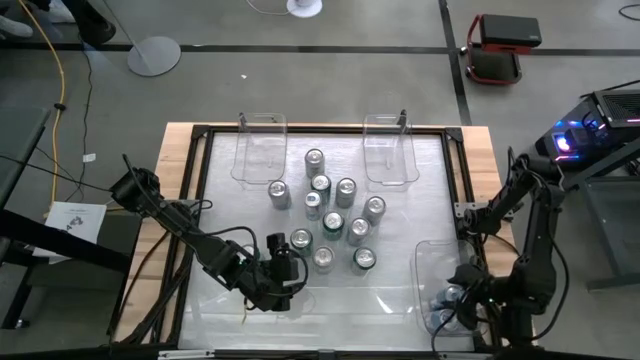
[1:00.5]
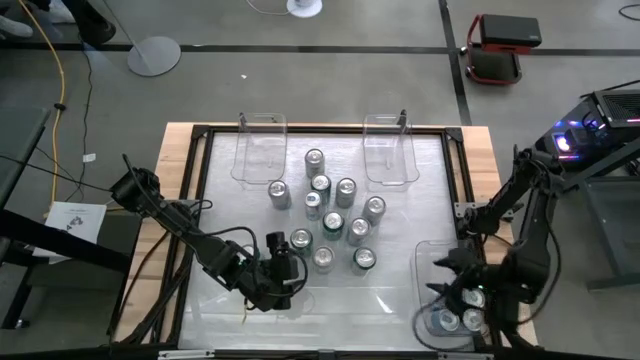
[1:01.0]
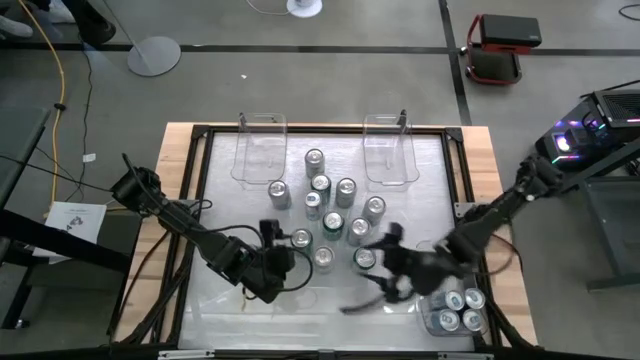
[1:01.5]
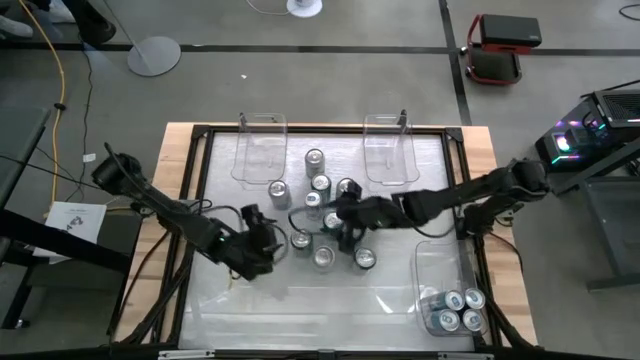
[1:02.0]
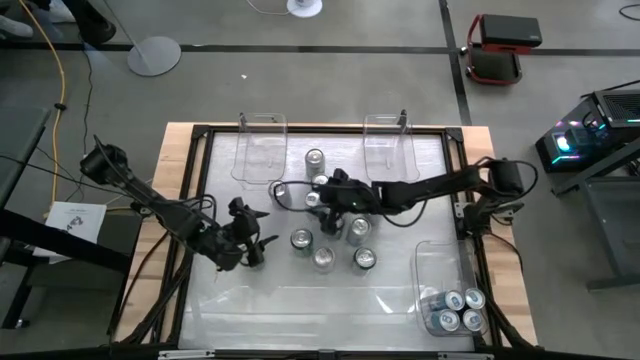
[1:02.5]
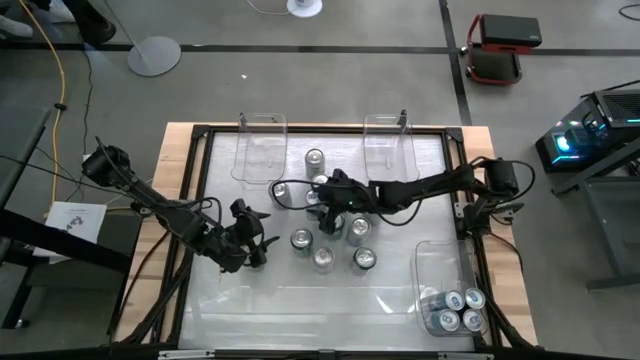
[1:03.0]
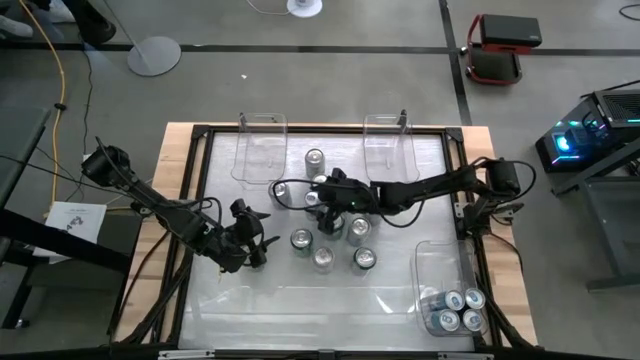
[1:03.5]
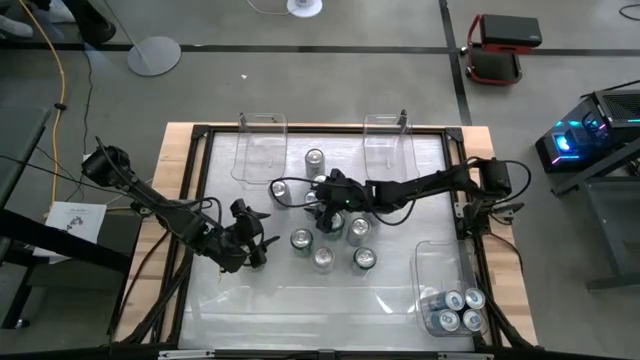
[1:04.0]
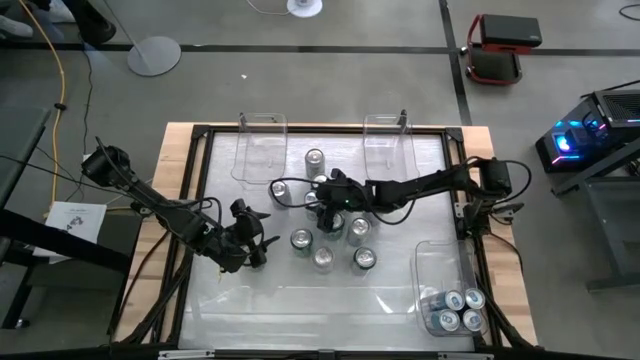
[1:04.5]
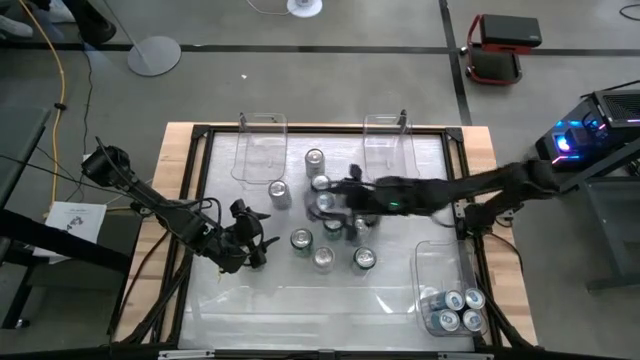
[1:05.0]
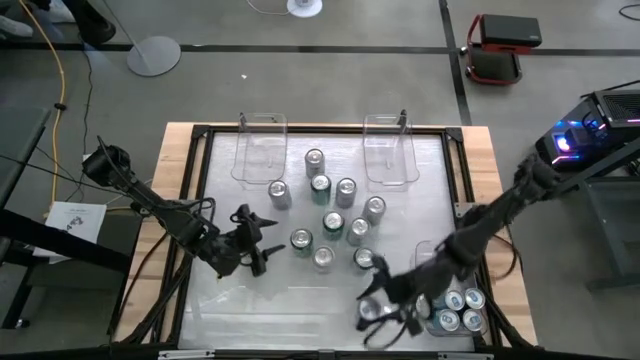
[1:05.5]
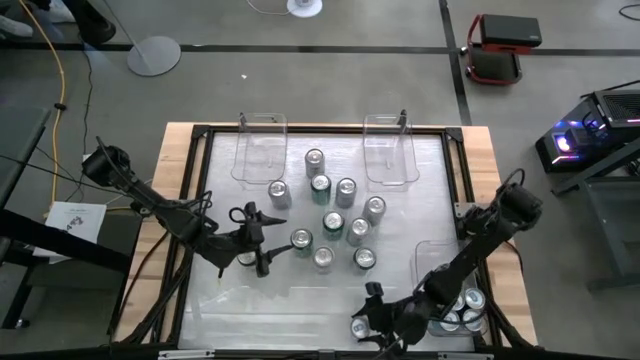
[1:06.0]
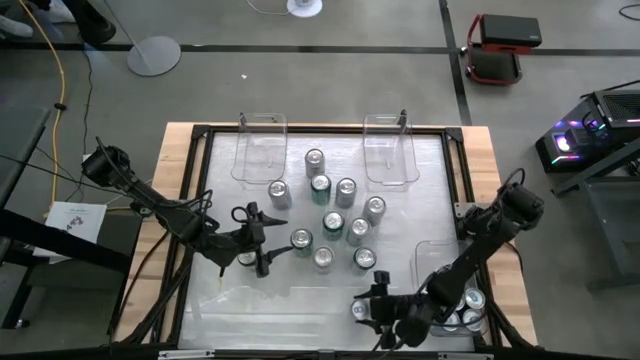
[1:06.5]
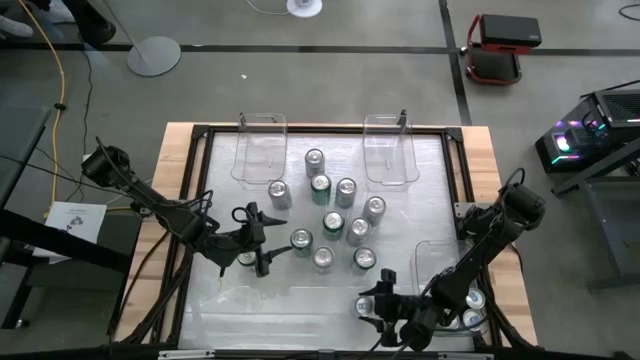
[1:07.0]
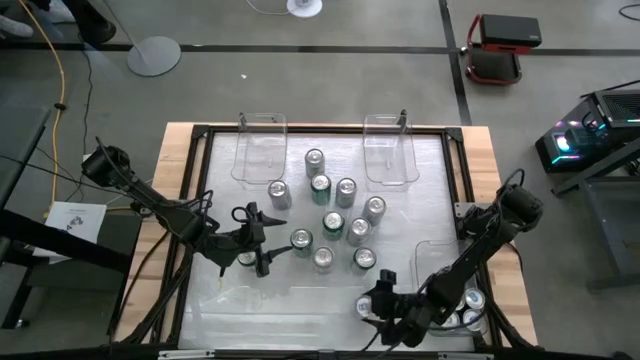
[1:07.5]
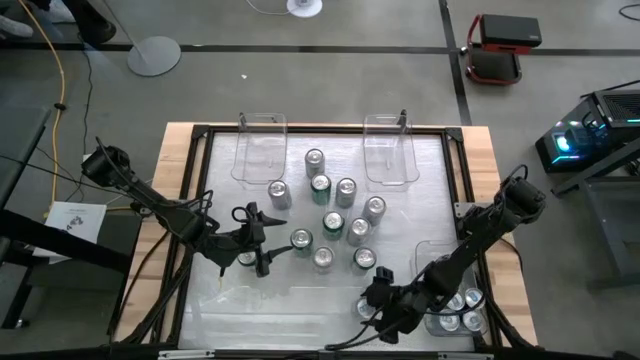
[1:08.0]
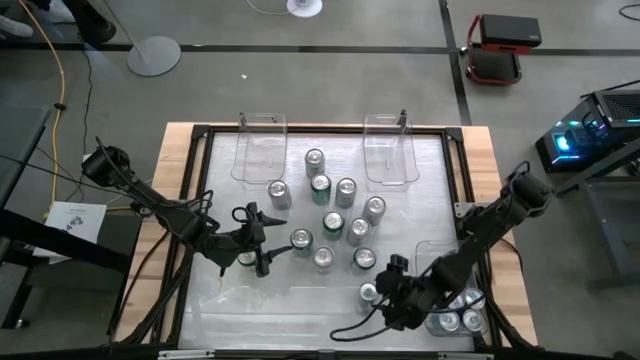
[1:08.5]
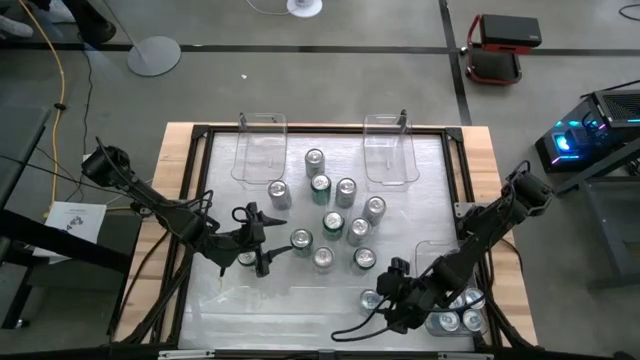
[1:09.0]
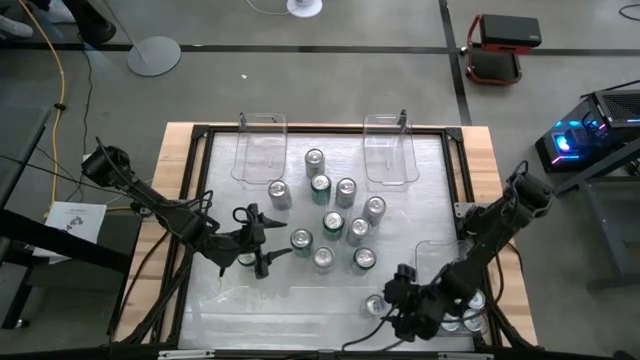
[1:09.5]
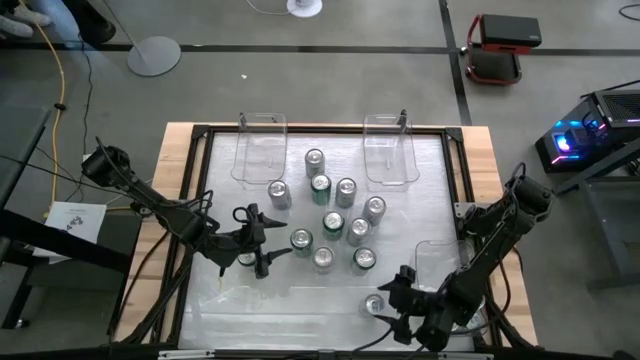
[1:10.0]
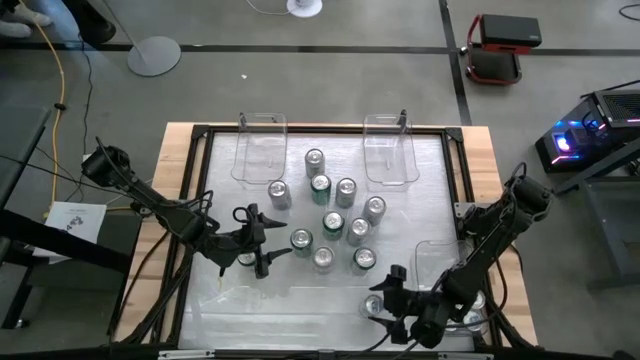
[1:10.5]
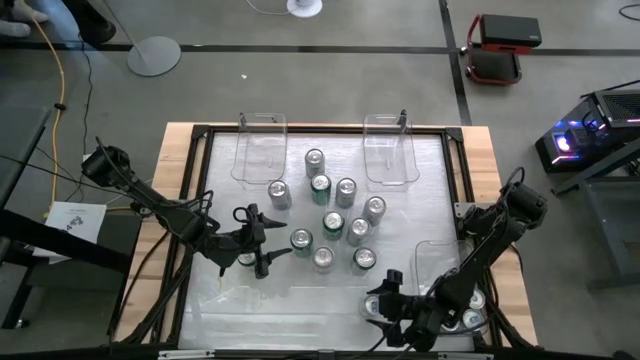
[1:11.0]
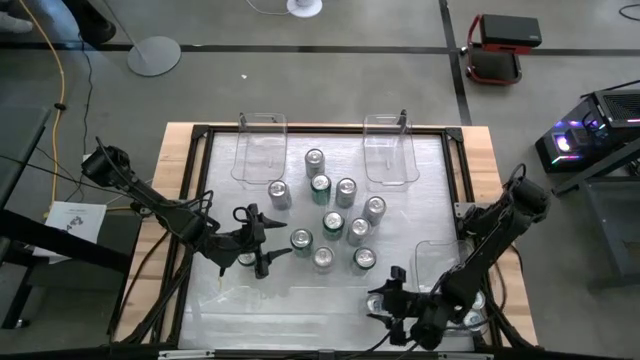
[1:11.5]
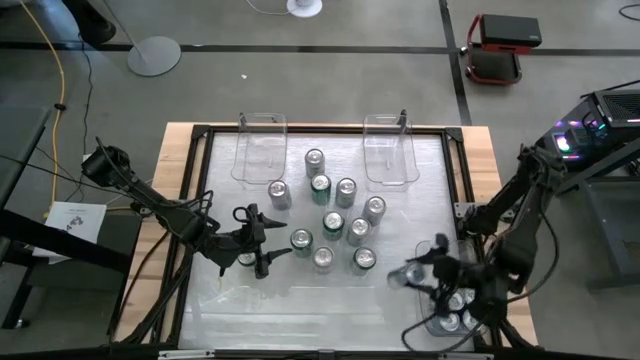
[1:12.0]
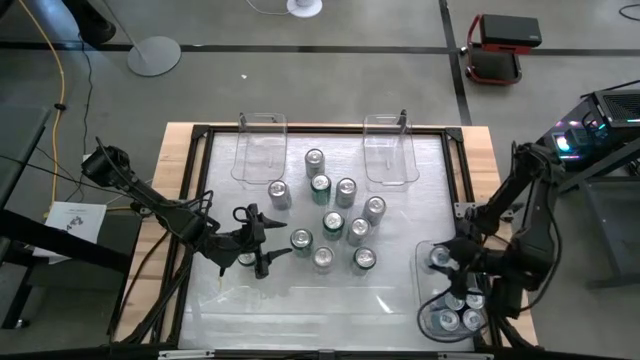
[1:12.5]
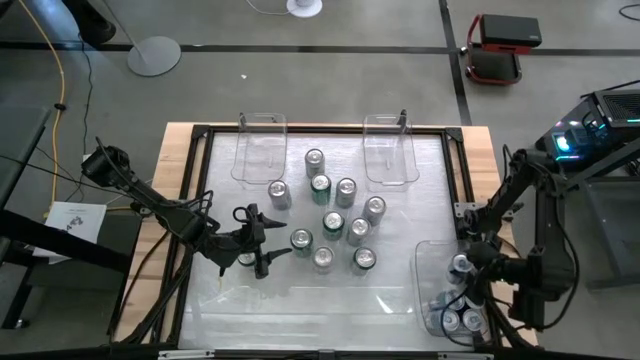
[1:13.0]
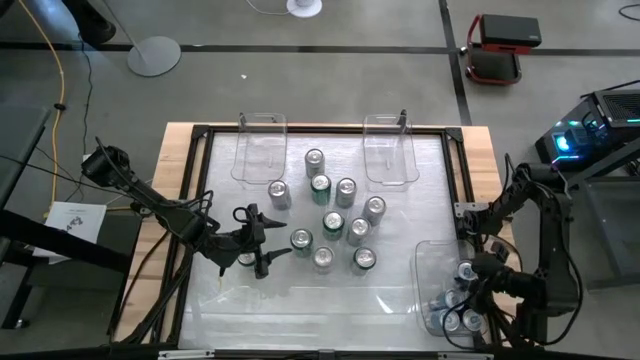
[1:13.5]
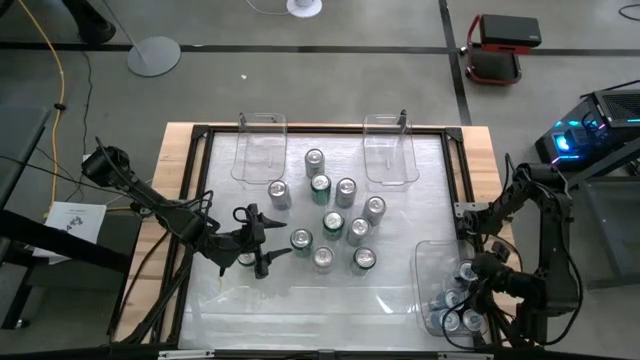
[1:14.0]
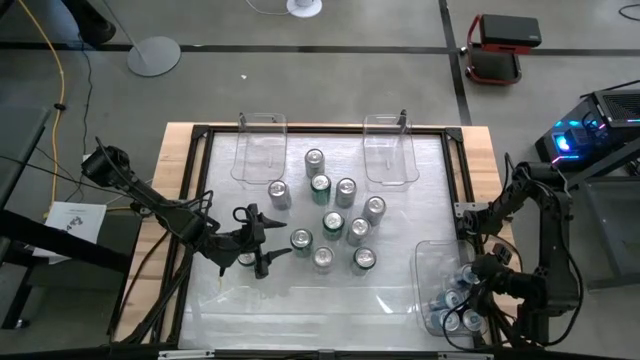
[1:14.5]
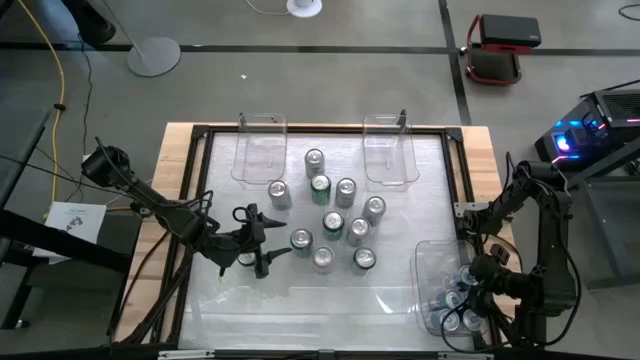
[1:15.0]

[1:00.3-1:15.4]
Task: Sort soda cans
Put the blue soda can into the bottom right transparent bin
